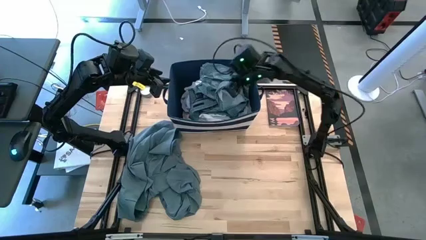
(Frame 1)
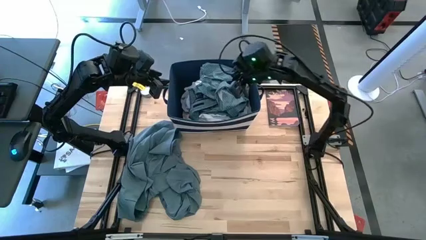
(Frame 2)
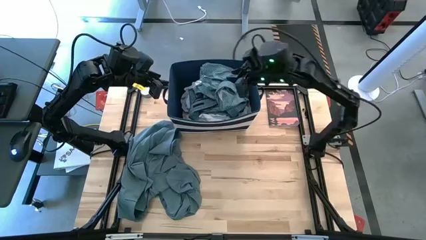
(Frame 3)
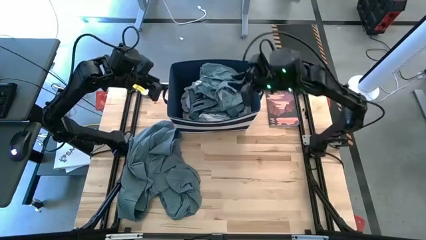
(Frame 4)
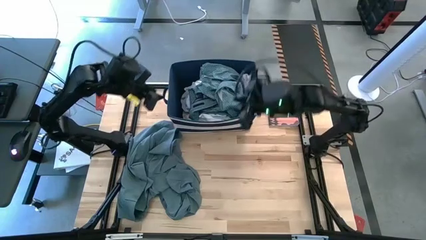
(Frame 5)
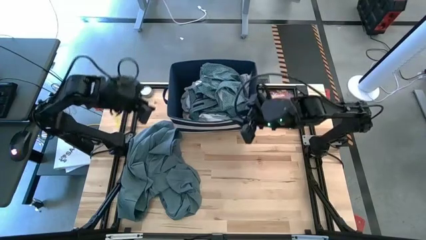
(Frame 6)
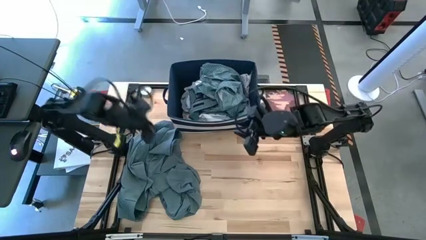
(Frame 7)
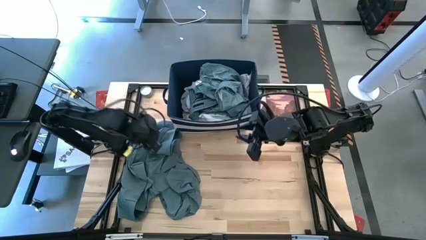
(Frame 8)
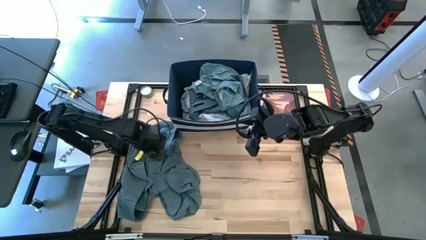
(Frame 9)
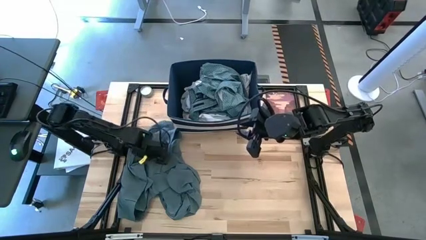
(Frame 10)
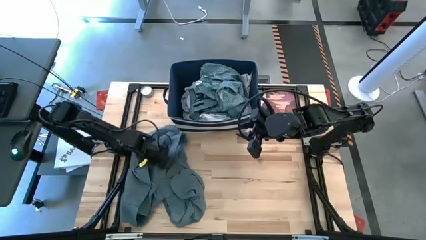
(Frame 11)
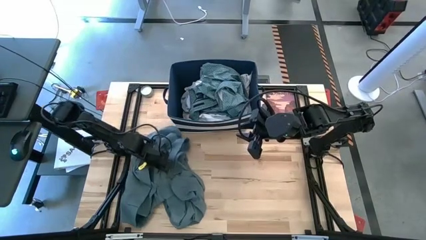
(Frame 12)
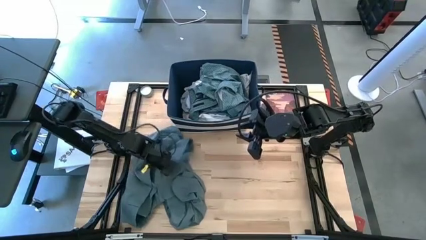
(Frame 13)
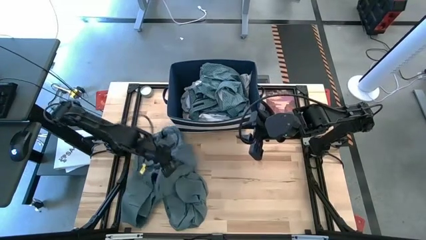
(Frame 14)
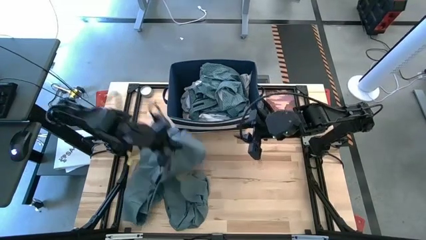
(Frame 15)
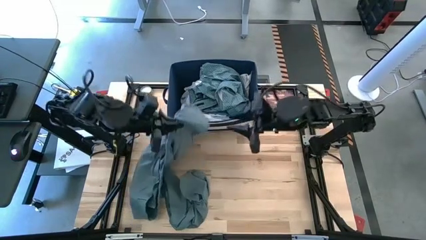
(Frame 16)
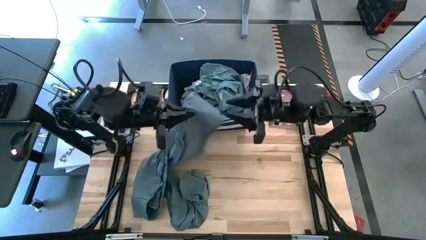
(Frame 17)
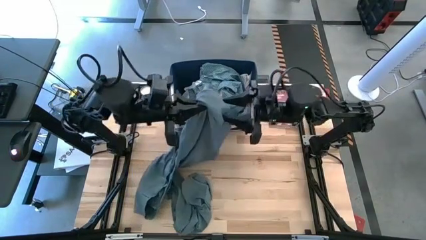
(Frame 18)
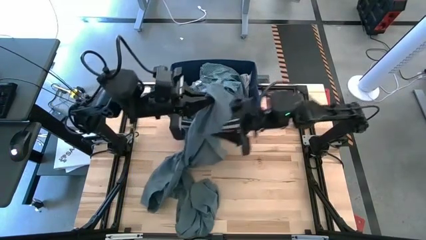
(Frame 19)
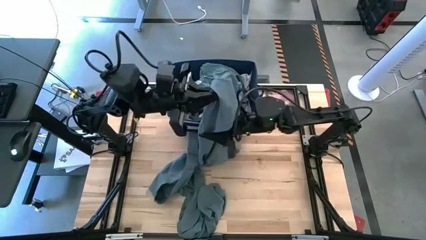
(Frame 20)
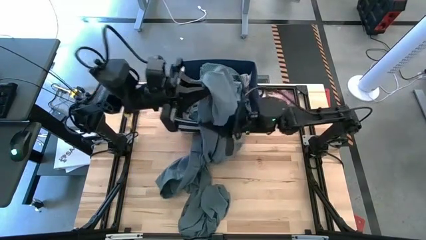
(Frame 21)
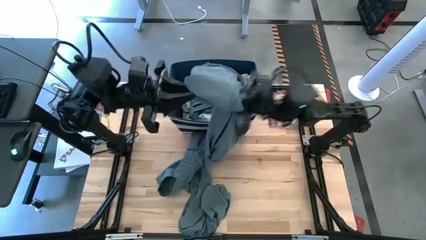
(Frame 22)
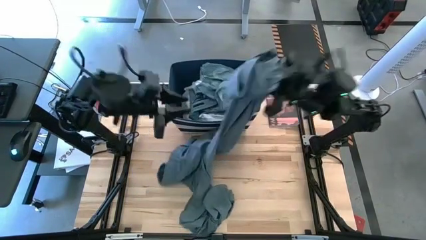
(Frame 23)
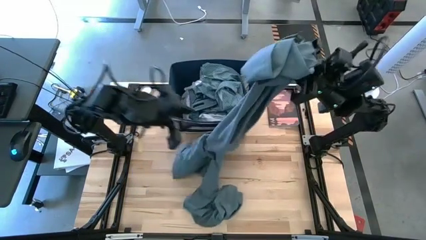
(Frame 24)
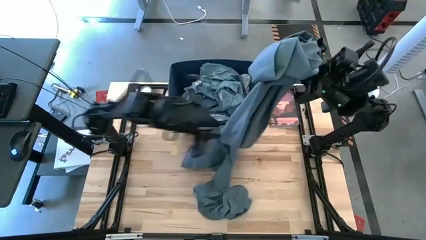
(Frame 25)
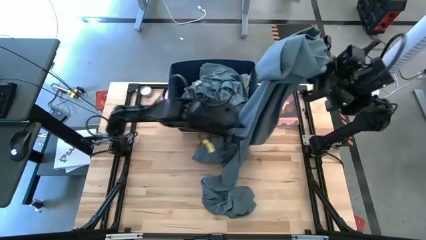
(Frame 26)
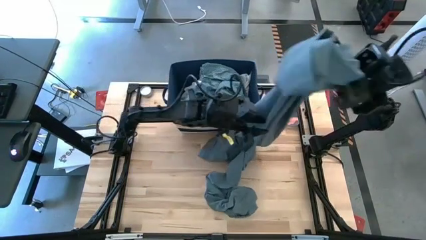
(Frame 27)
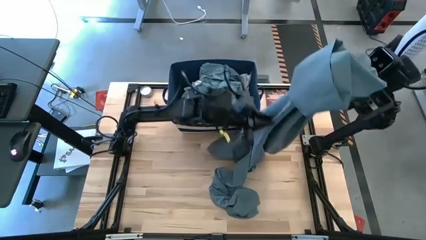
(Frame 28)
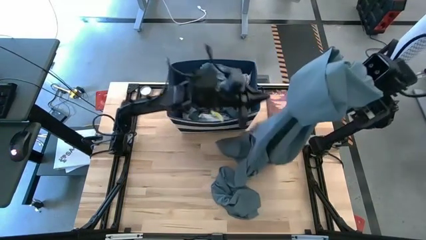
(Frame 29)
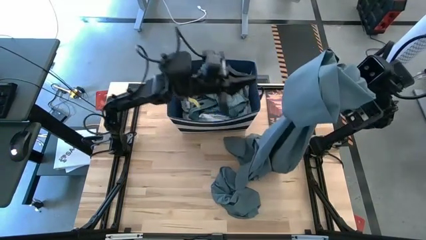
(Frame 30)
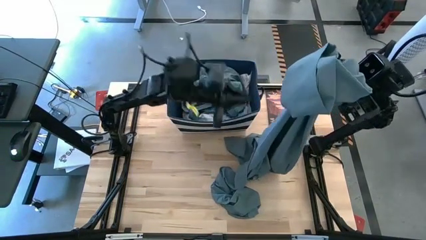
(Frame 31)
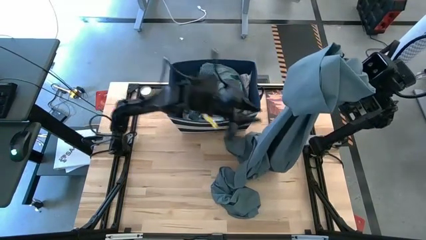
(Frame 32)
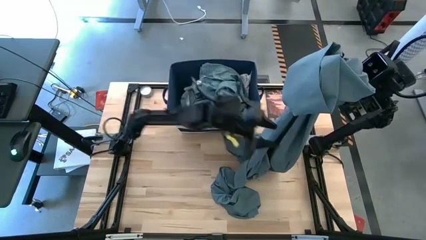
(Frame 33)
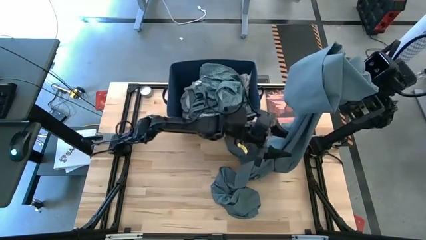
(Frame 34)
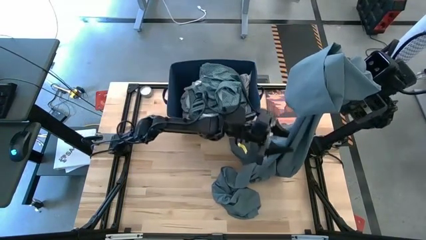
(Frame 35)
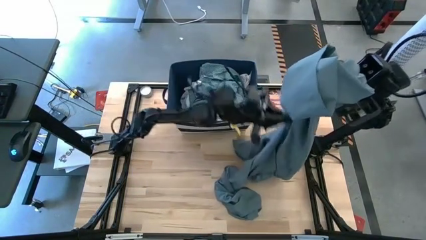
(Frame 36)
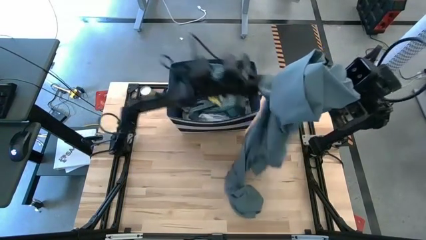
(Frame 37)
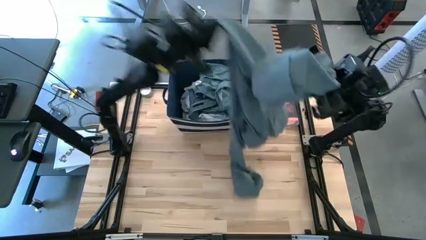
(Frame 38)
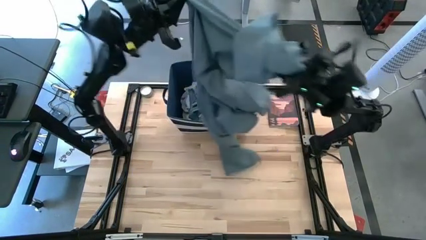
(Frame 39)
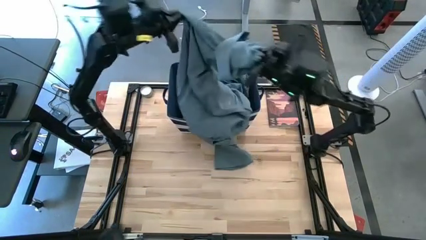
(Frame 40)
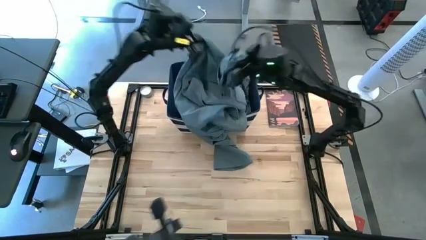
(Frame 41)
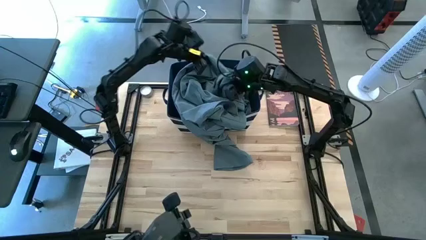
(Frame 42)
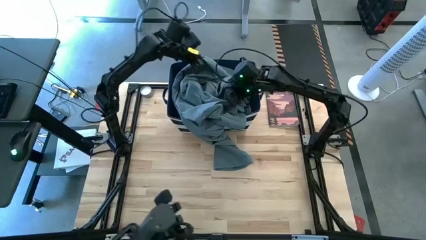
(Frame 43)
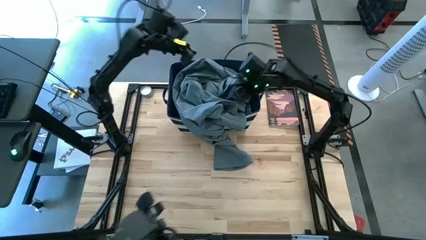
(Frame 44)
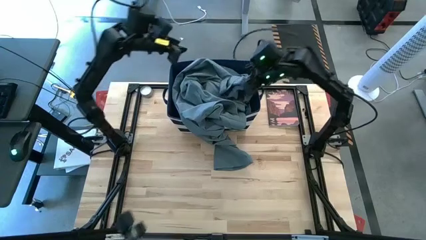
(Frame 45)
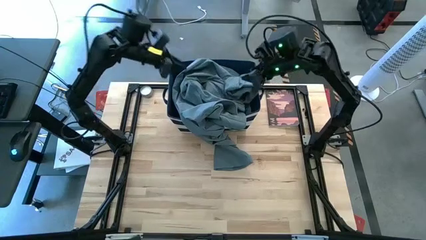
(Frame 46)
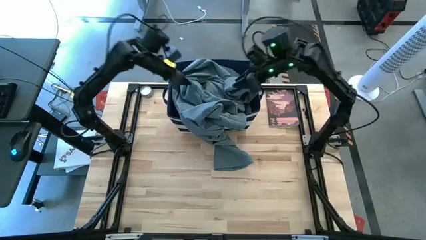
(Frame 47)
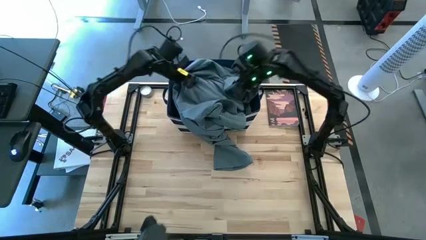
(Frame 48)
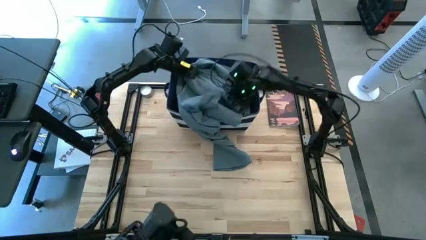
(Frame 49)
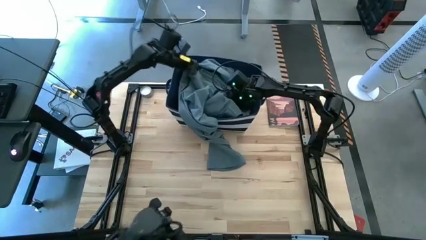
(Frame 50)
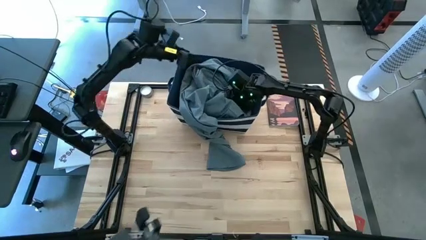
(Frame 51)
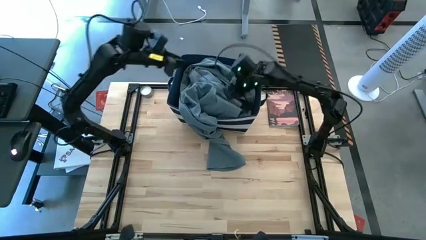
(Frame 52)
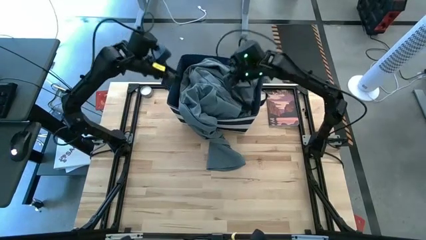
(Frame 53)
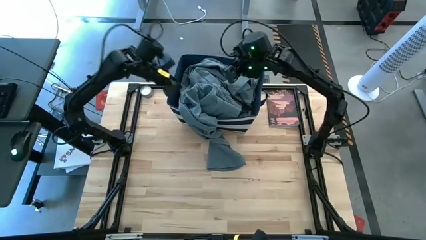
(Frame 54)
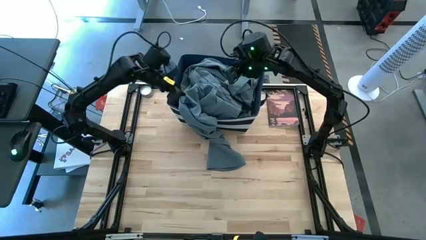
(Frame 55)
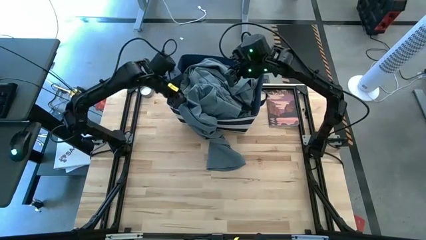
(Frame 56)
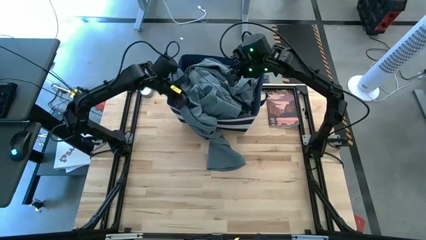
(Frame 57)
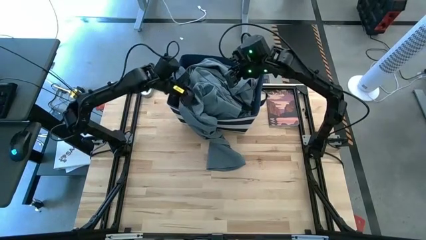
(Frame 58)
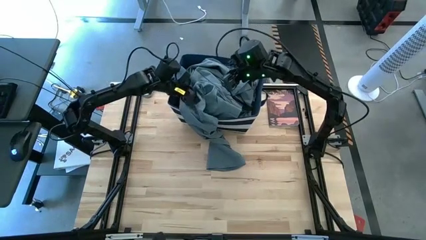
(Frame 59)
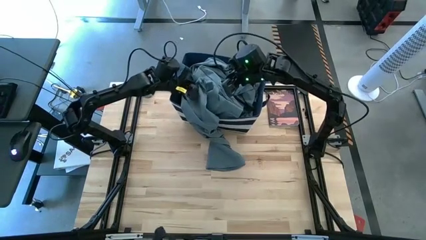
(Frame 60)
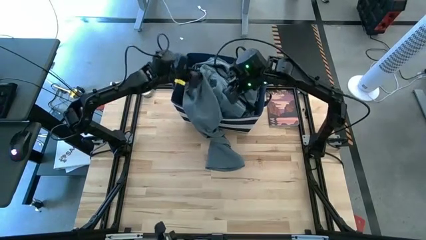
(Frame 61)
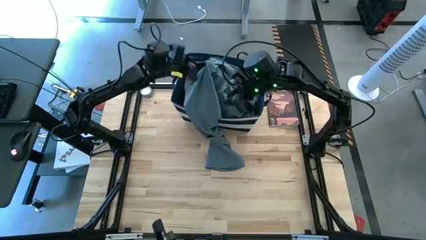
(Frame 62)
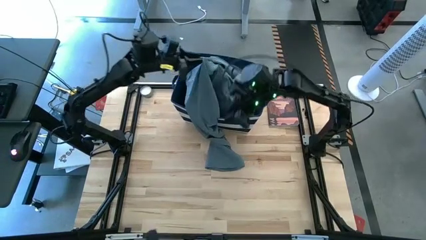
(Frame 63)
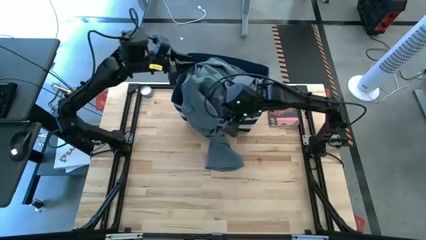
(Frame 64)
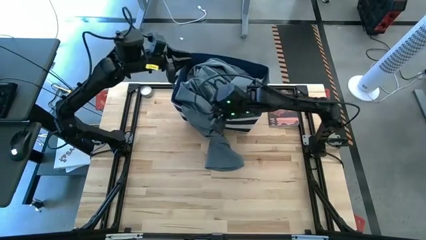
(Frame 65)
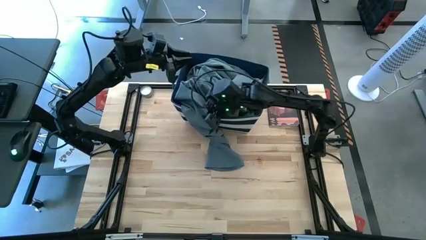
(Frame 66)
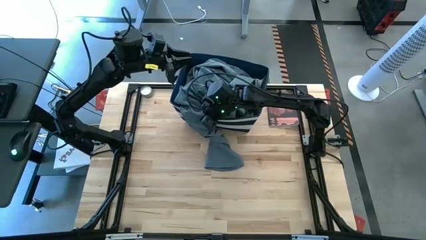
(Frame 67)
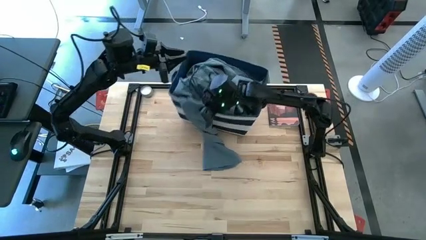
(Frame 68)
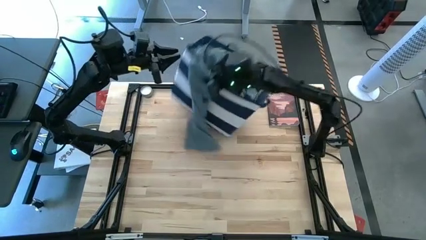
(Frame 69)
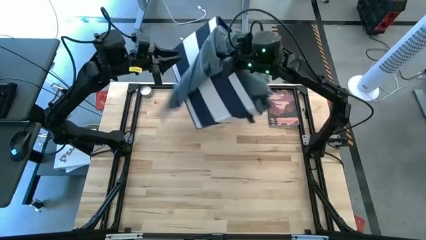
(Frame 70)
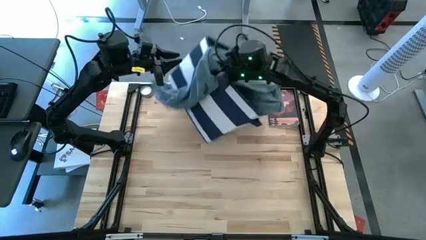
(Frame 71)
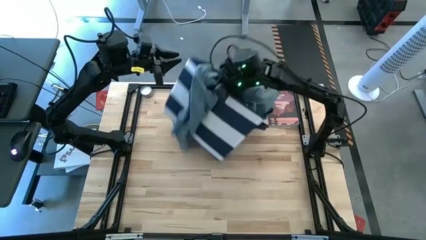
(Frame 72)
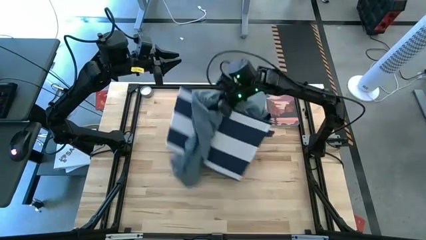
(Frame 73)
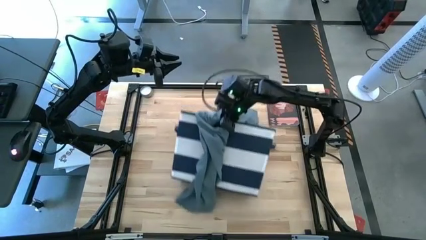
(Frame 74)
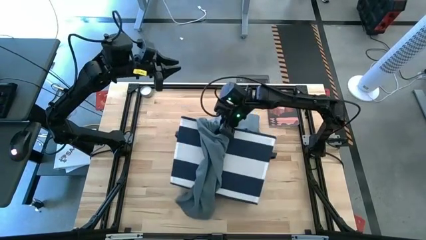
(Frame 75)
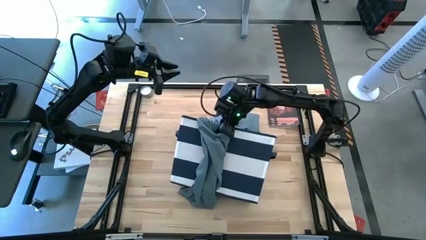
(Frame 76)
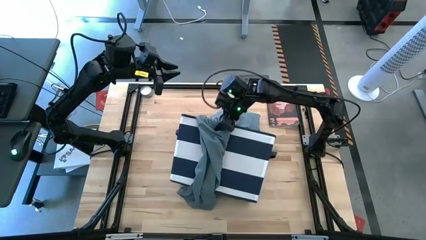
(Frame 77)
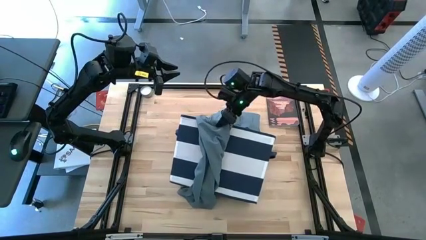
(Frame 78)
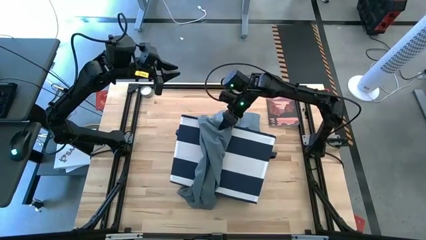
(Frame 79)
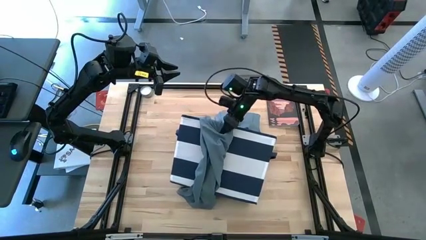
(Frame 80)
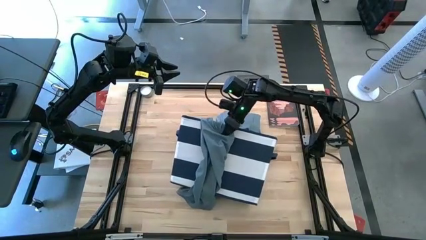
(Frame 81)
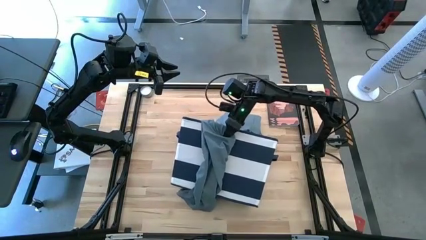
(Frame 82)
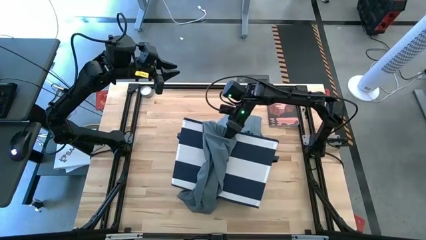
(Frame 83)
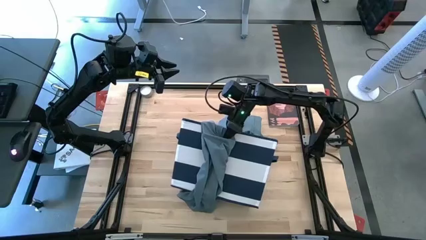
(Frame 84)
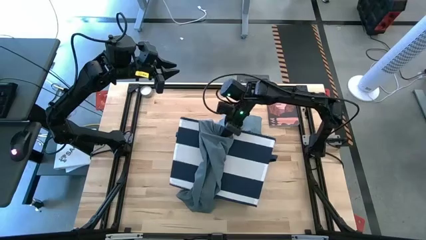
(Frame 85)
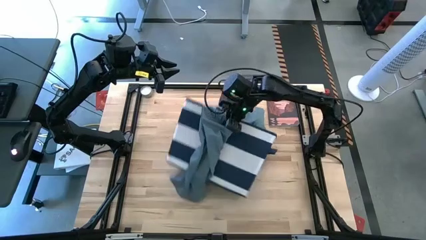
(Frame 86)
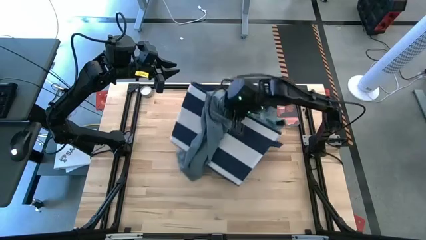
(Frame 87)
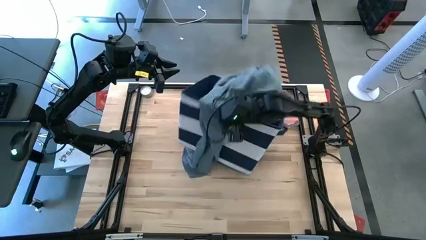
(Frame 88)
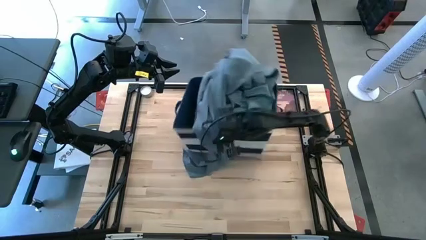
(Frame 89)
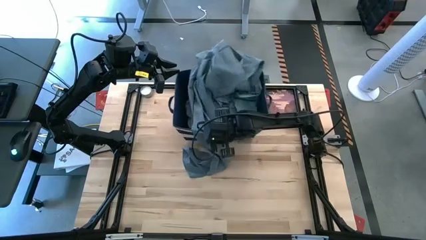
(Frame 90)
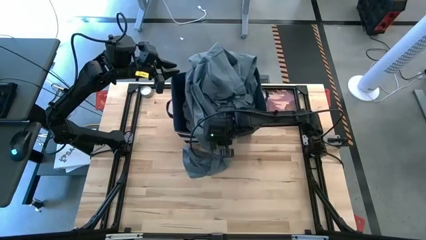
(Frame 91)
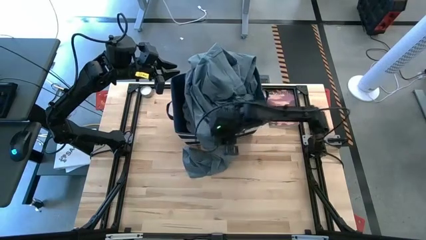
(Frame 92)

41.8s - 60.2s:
Task: Sort clothes
Put the gray pants into the blue bin
